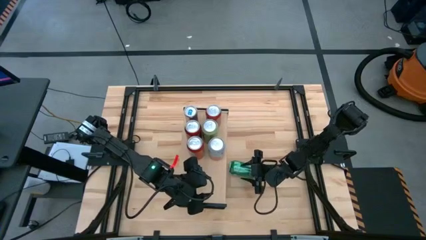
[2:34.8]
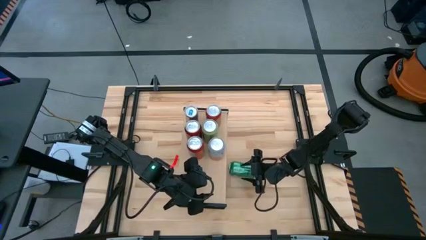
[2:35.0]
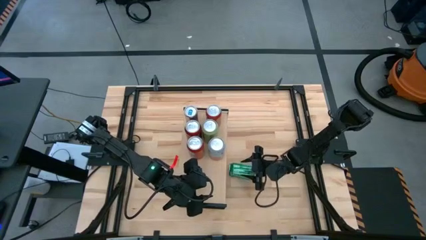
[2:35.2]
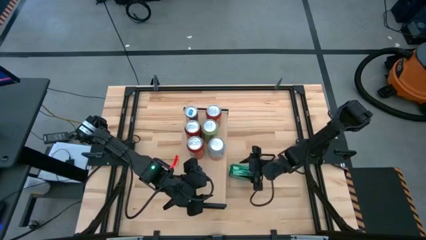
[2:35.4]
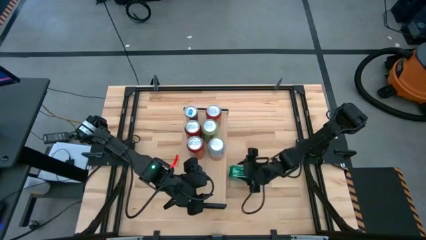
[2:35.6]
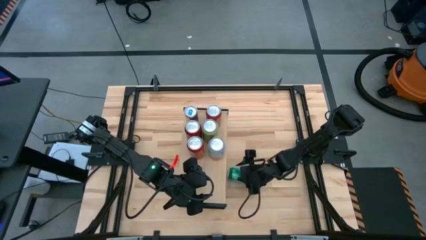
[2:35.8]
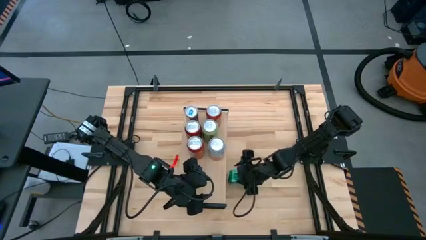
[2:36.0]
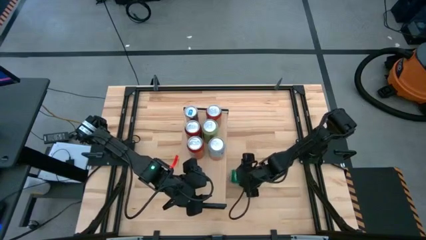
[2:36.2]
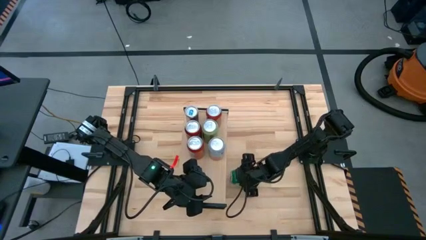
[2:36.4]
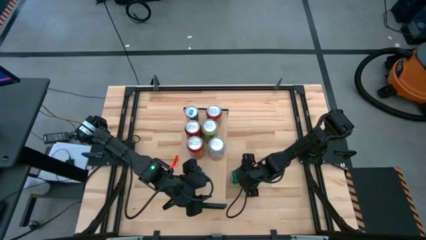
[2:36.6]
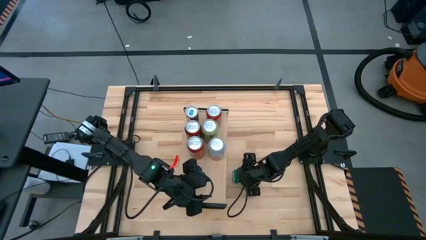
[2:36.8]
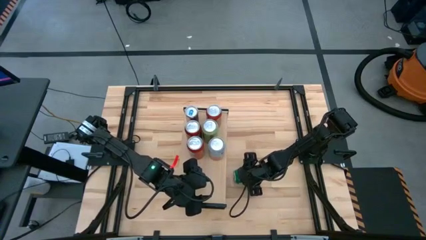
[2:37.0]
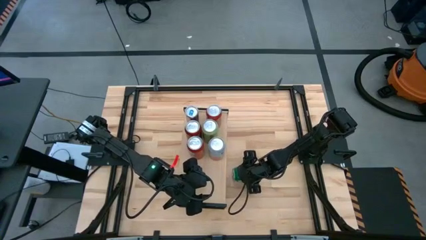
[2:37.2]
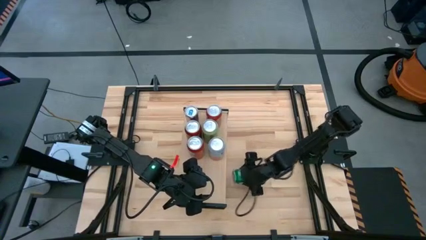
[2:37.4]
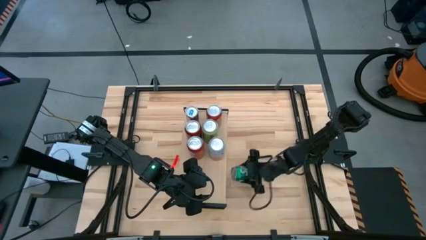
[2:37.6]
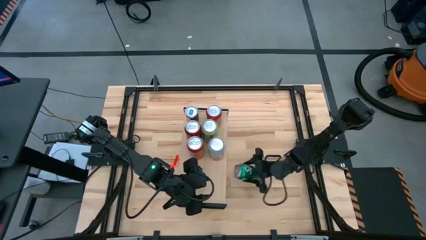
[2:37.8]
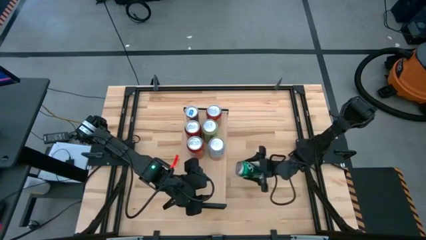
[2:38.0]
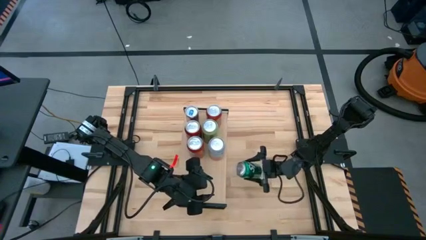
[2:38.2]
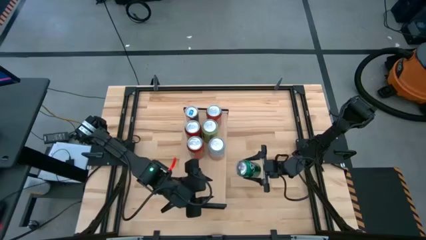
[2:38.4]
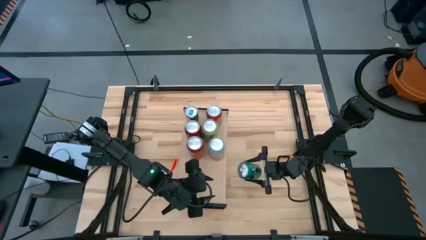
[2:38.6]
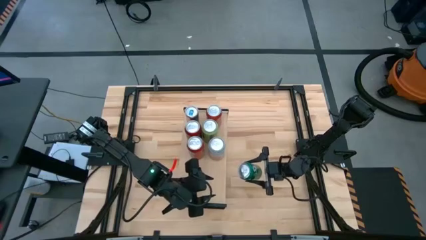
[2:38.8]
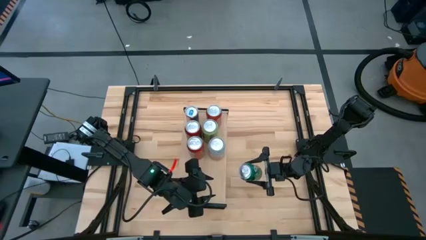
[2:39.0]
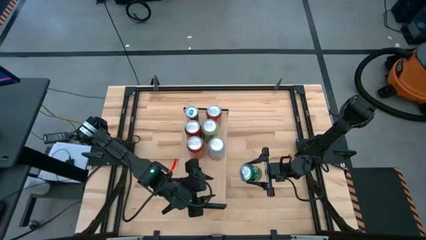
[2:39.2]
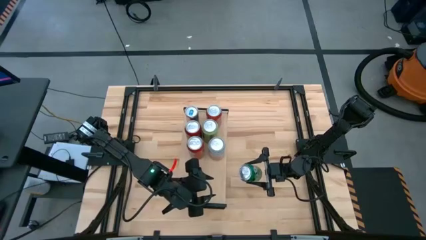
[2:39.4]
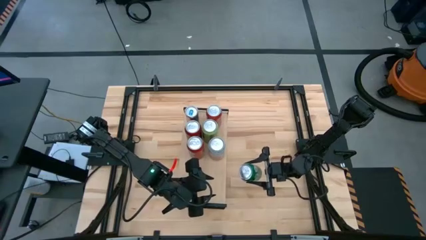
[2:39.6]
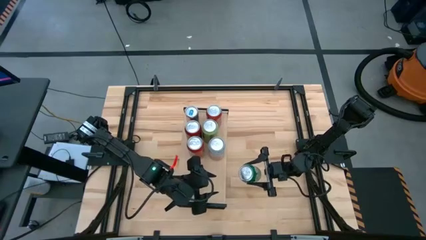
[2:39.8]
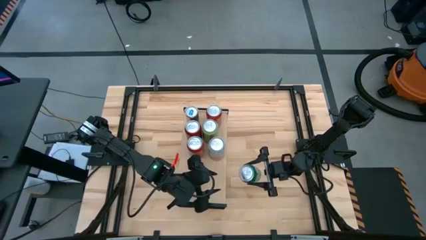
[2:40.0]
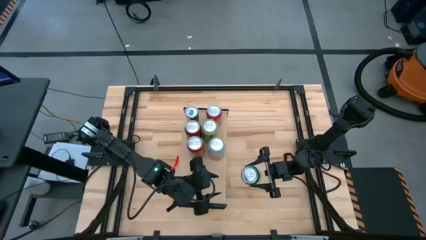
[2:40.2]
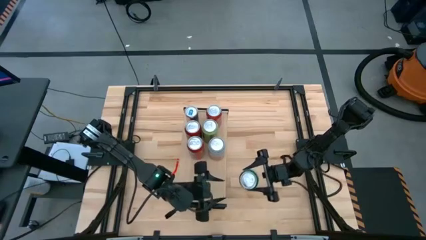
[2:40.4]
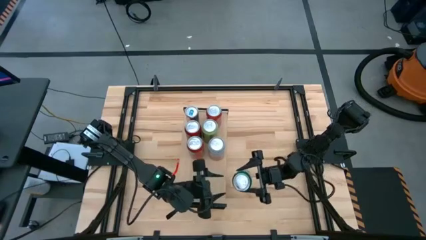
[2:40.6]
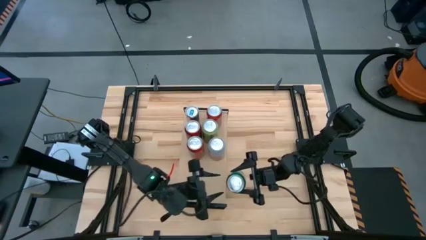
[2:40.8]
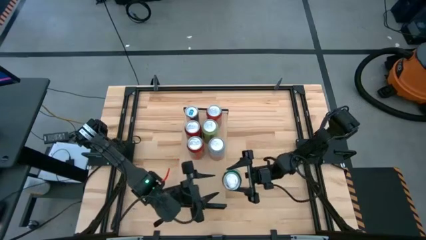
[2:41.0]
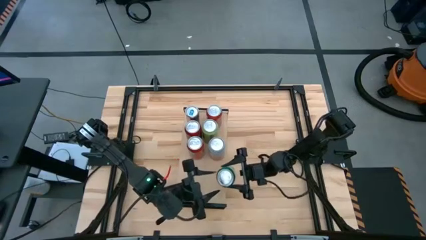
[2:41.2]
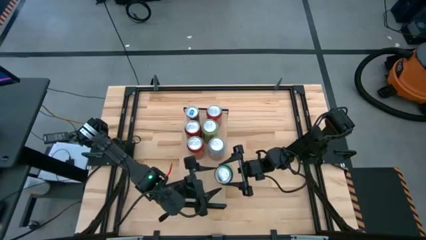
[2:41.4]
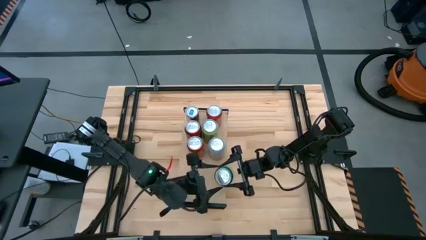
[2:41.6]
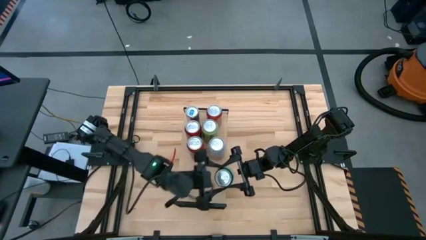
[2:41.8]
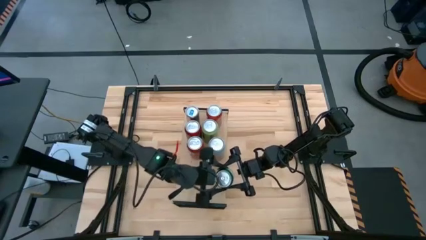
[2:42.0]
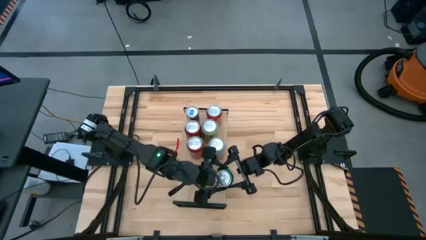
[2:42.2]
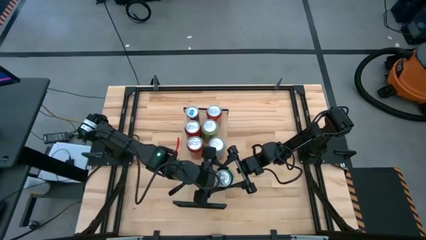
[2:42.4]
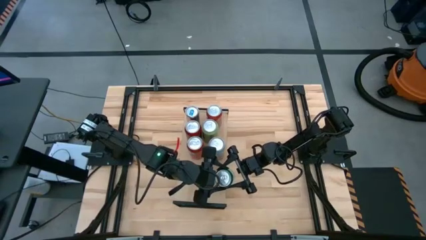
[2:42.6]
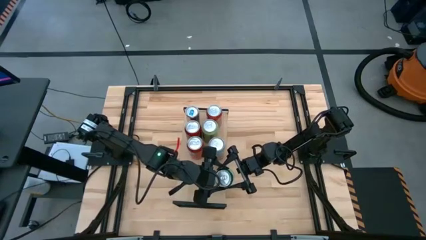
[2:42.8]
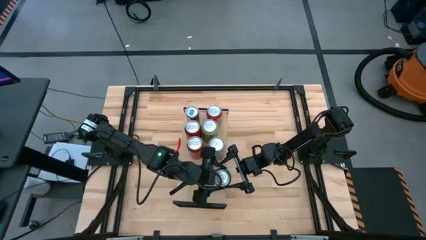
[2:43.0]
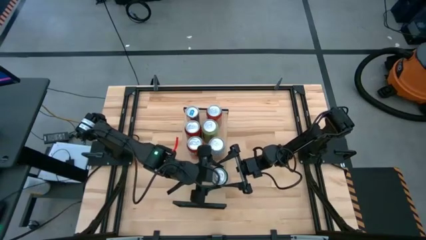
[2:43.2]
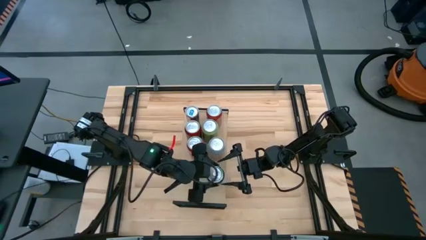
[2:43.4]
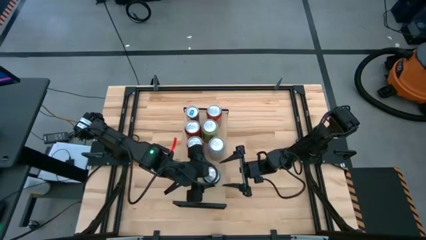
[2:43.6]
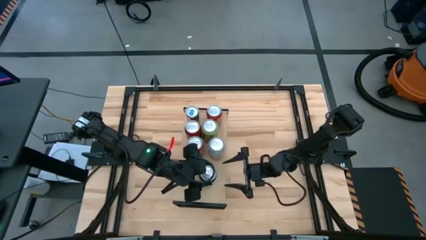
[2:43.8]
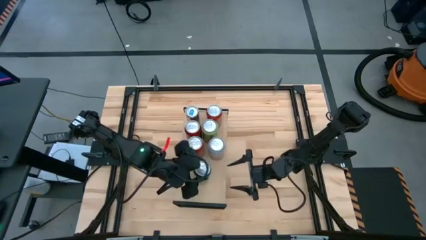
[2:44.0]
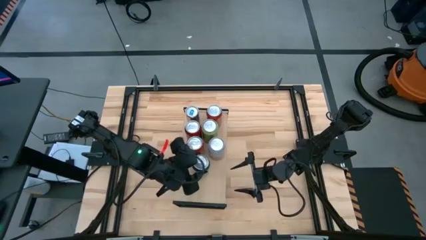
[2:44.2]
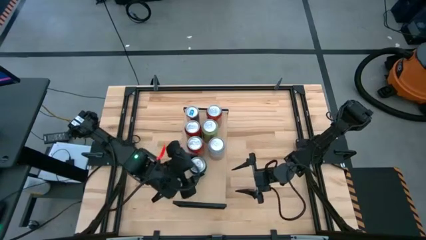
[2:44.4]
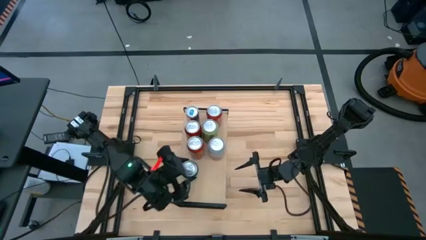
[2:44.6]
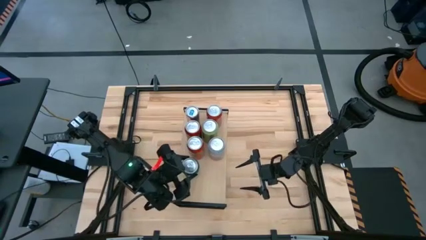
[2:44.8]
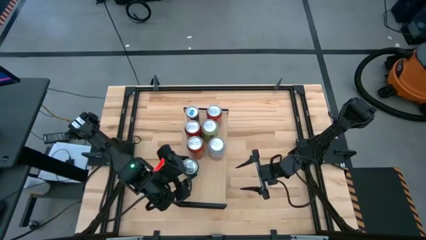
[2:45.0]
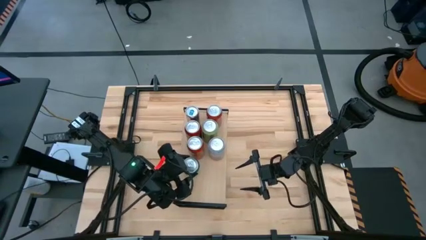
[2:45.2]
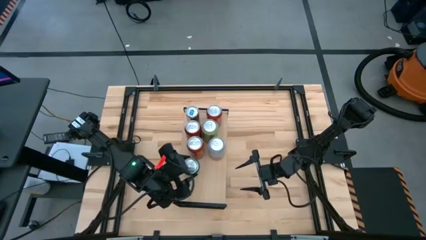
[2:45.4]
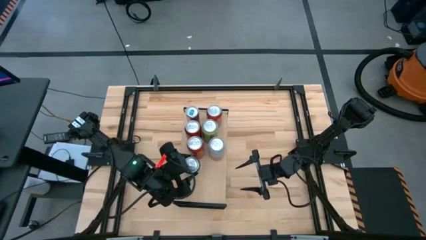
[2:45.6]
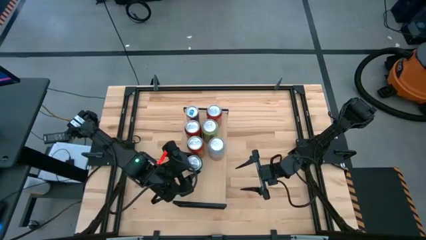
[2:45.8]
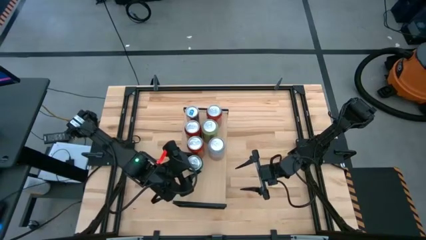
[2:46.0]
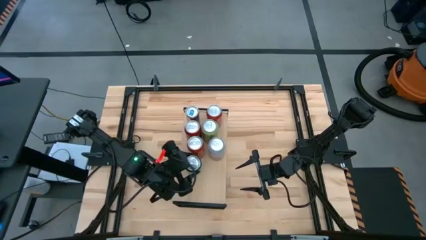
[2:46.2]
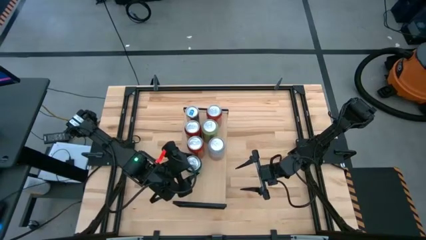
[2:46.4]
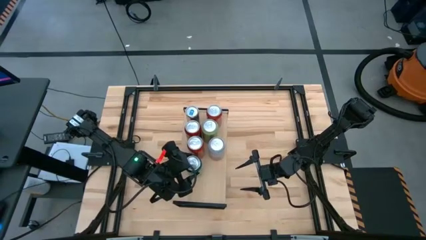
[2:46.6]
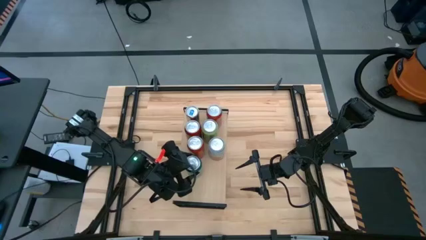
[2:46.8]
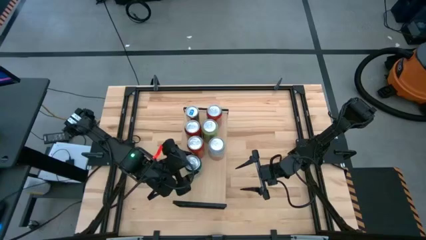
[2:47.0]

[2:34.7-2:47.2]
Task: Place canned beverage on shelf
Put the green soda can on the shelf
